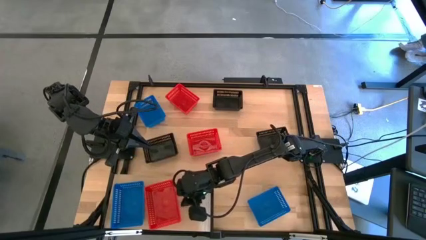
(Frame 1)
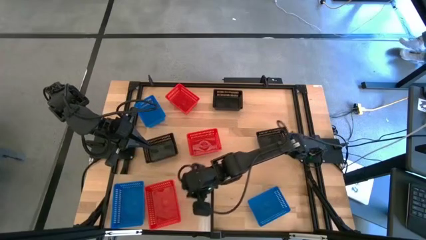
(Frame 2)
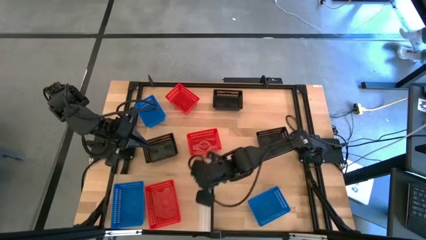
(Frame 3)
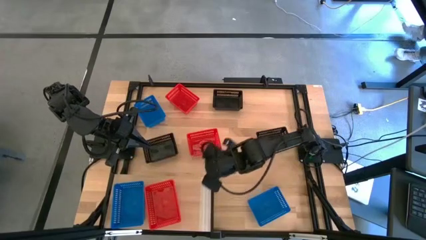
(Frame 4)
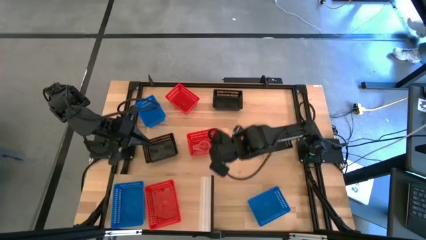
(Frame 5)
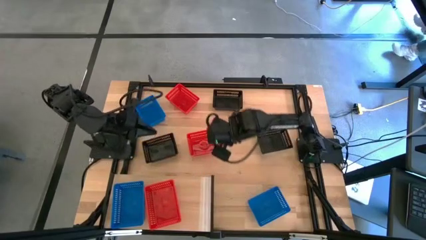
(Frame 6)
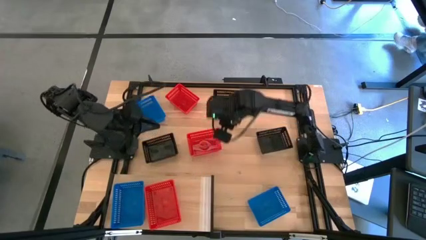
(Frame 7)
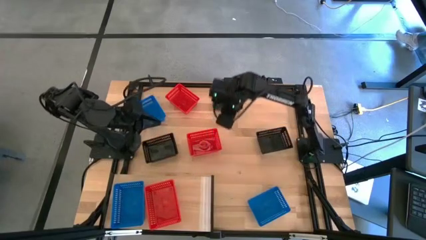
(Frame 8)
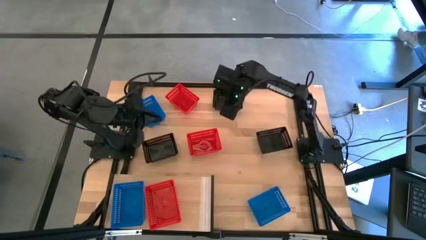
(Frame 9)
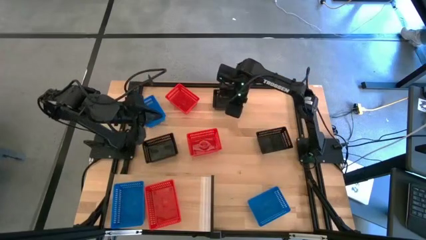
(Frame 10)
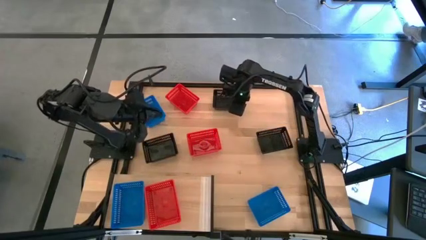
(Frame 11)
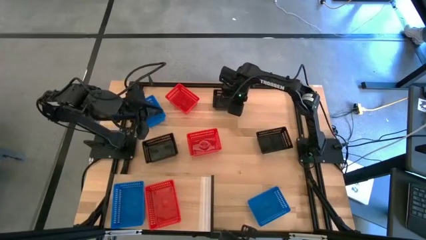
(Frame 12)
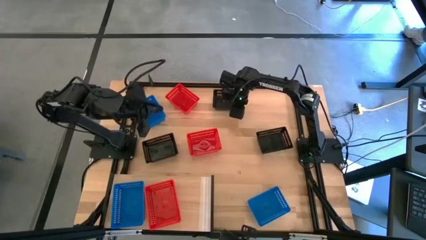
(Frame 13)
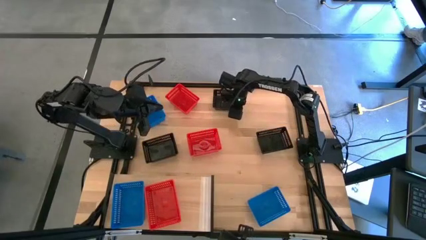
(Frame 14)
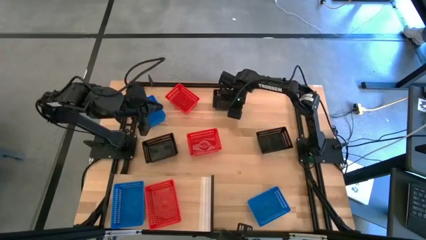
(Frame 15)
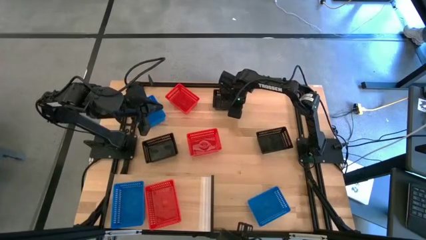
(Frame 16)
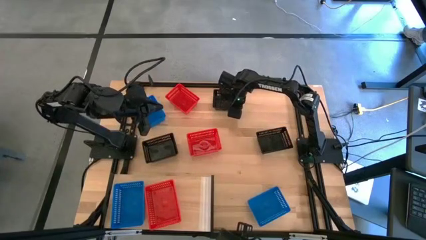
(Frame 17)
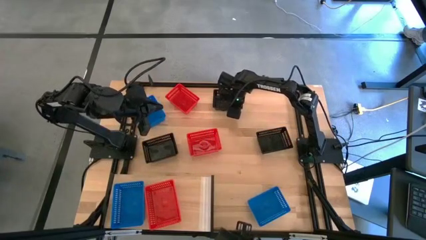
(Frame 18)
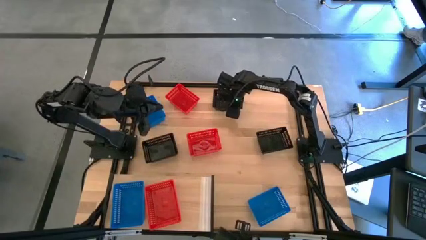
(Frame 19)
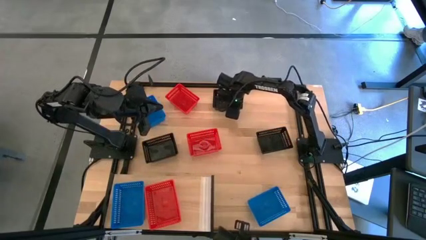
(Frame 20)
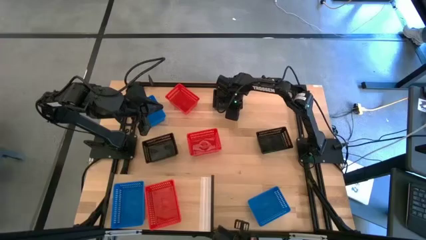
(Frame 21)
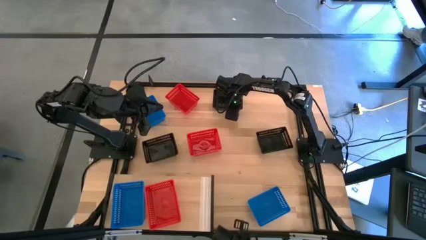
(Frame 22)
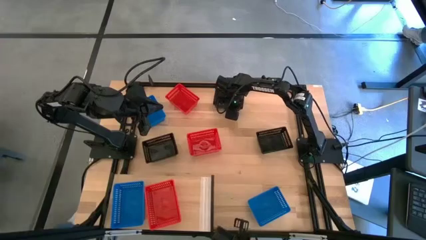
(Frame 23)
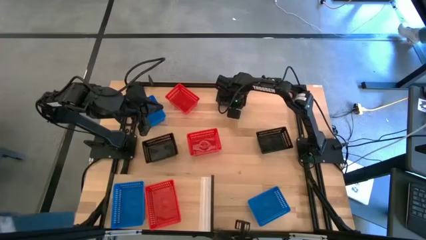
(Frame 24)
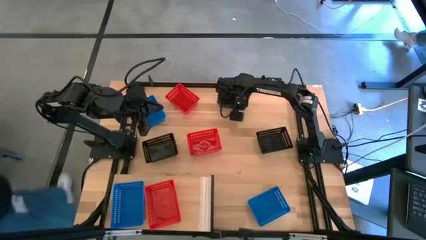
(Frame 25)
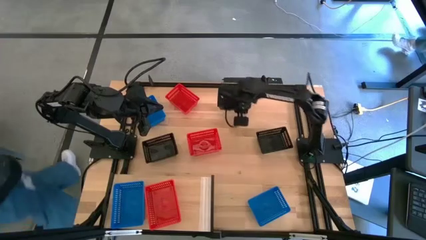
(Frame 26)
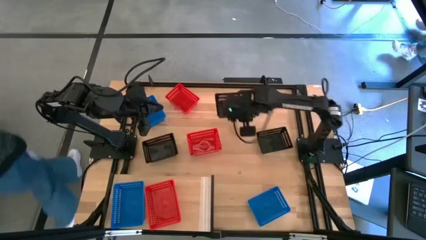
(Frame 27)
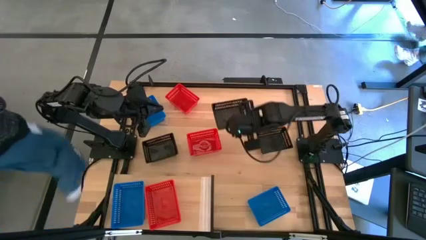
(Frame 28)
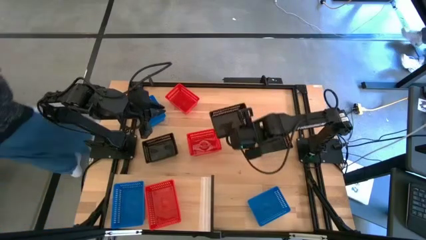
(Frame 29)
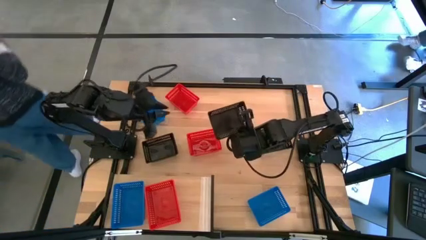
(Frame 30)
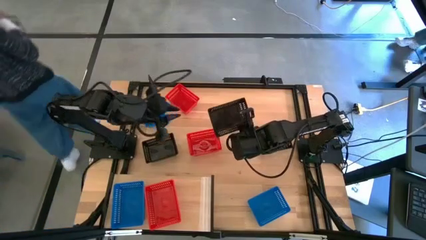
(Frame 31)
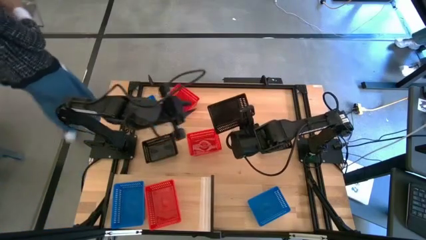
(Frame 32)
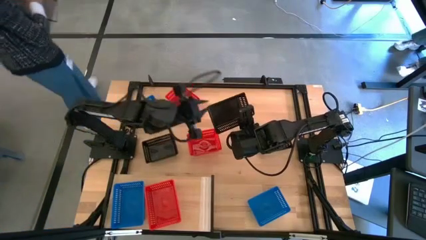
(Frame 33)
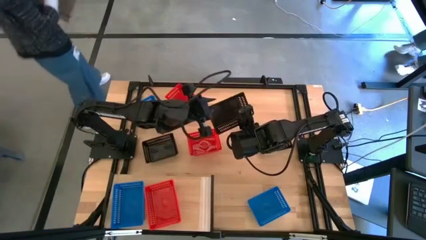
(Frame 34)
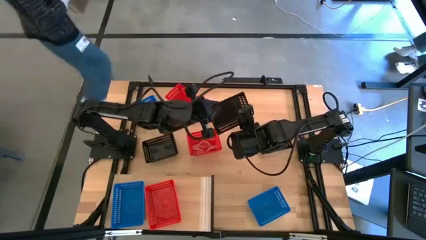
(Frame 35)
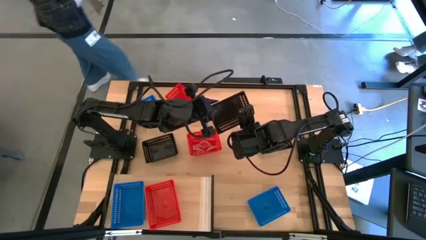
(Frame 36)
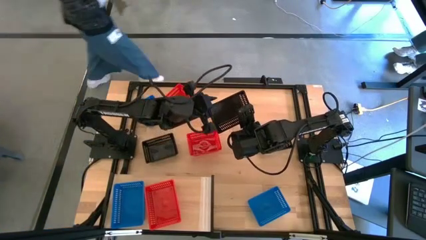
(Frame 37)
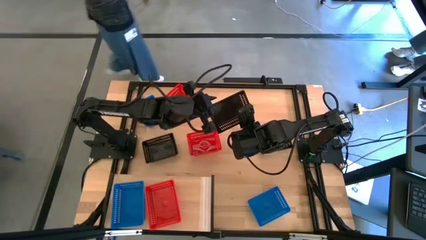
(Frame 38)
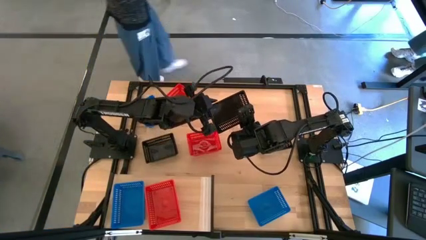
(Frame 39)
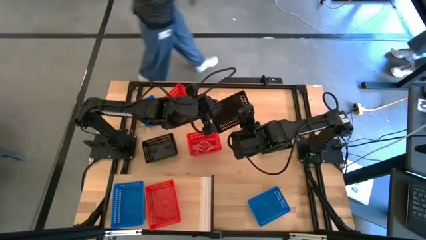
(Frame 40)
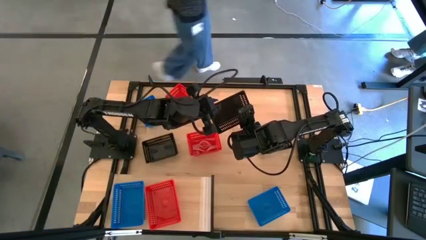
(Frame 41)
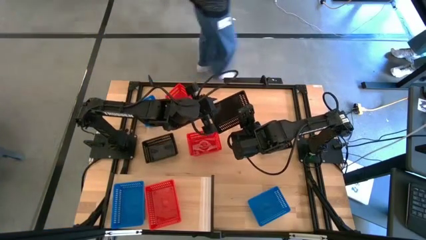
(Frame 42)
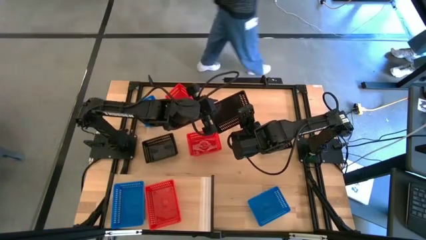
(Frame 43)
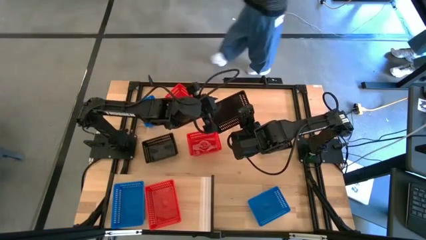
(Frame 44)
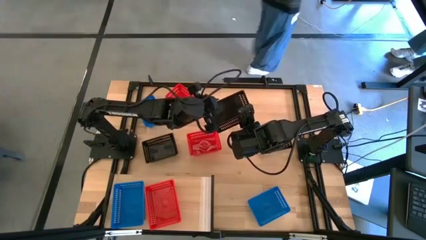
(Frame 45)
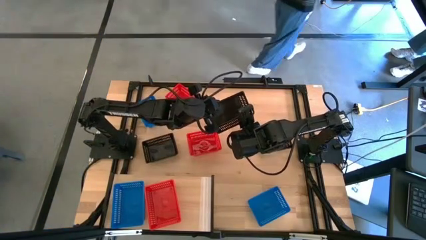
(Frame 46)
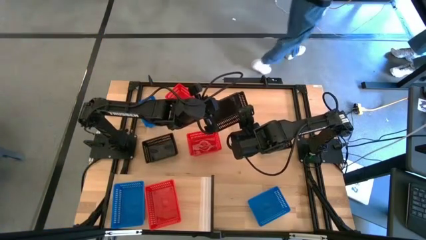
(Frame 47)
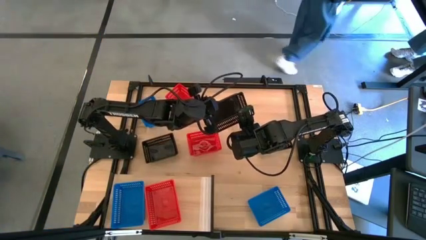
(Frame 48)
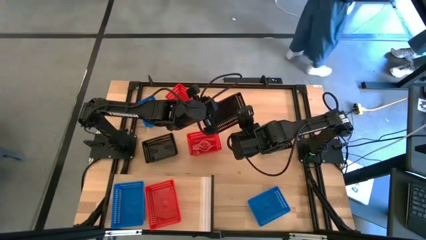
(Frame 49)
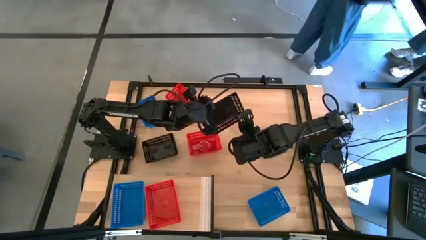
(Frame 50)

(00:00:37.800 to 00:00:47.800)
Task: Stack baskets on shelf by color
Put the center black bin on the shelf

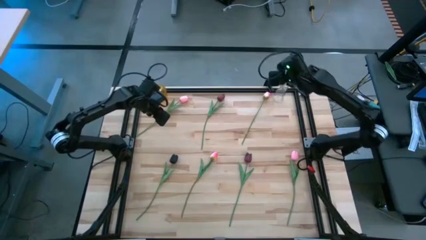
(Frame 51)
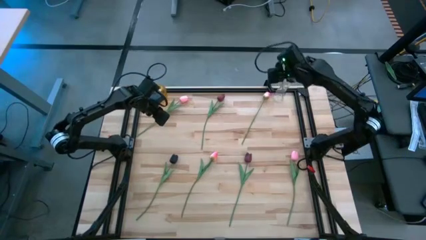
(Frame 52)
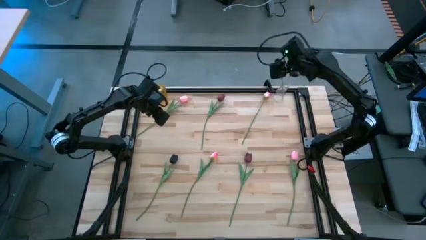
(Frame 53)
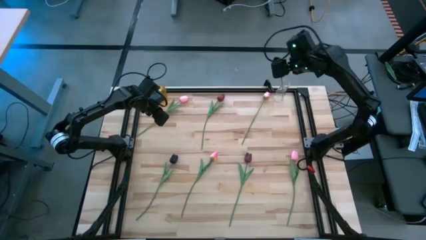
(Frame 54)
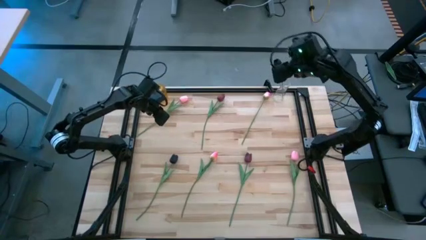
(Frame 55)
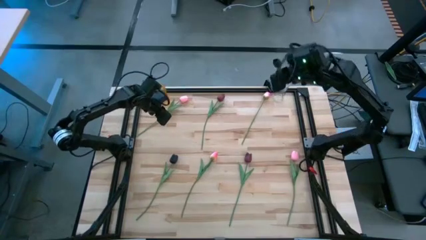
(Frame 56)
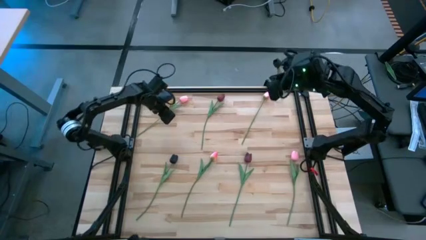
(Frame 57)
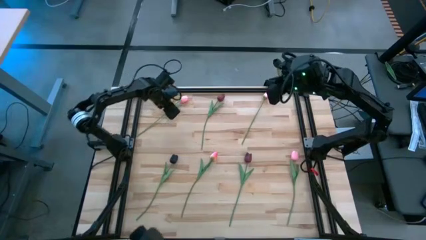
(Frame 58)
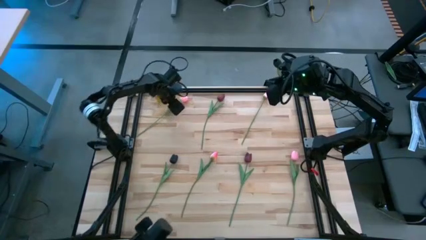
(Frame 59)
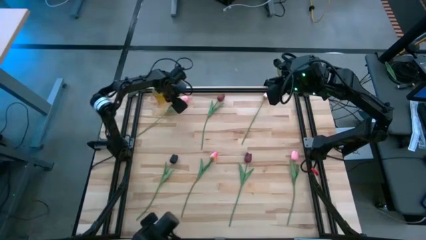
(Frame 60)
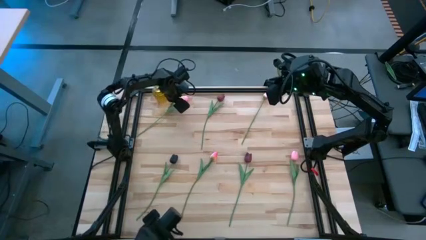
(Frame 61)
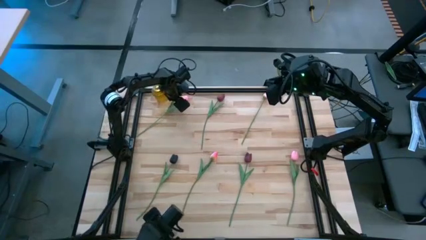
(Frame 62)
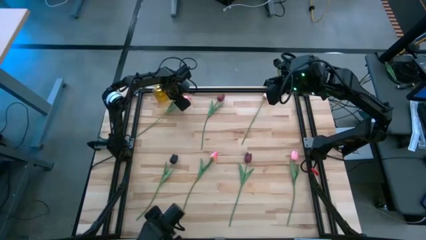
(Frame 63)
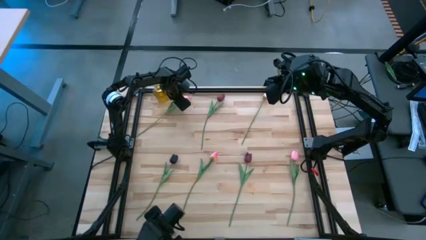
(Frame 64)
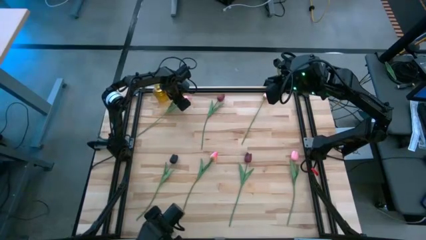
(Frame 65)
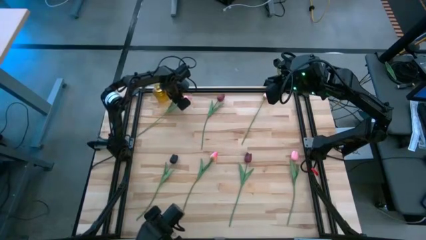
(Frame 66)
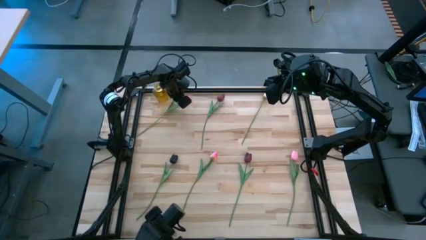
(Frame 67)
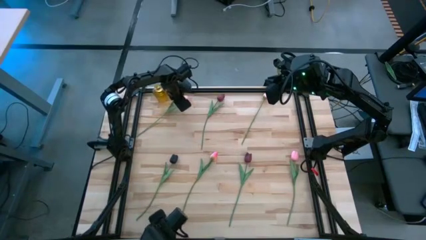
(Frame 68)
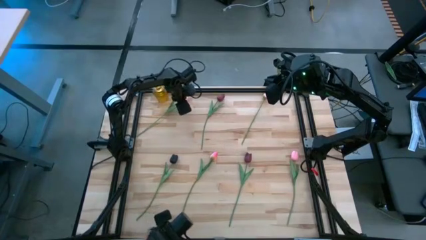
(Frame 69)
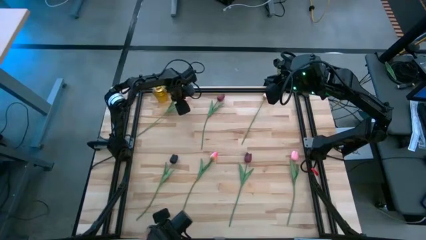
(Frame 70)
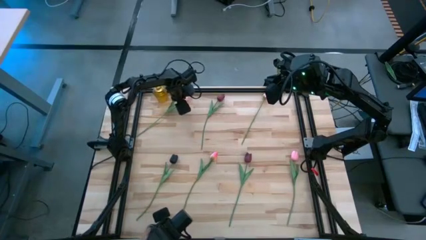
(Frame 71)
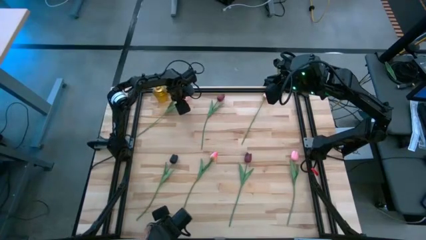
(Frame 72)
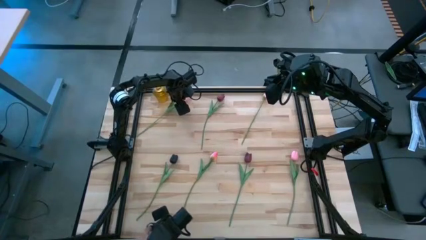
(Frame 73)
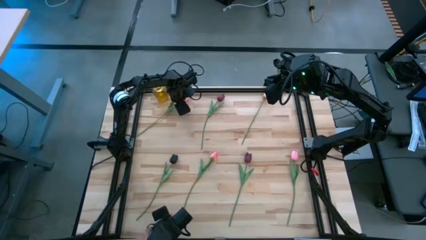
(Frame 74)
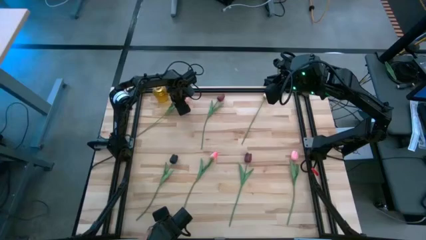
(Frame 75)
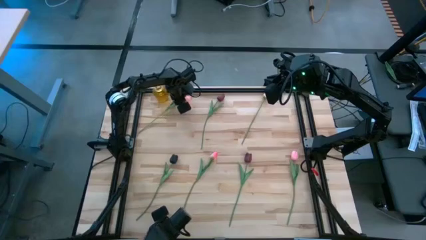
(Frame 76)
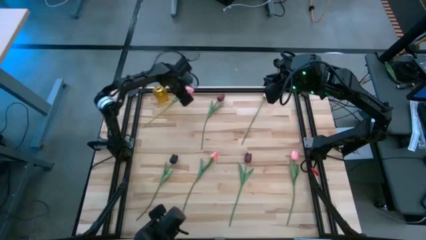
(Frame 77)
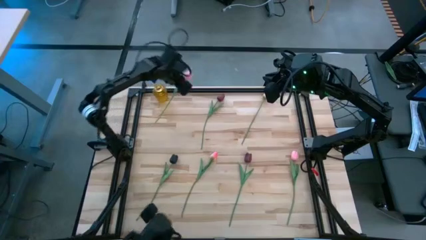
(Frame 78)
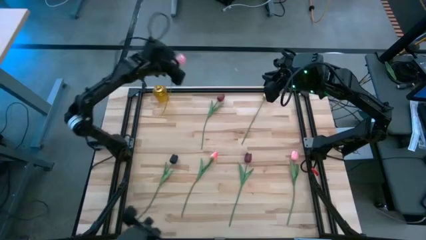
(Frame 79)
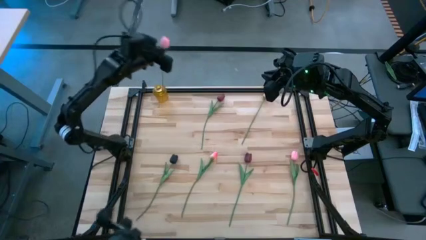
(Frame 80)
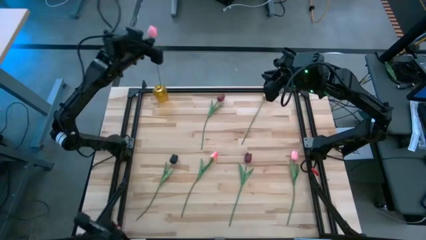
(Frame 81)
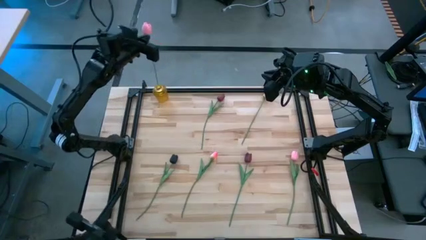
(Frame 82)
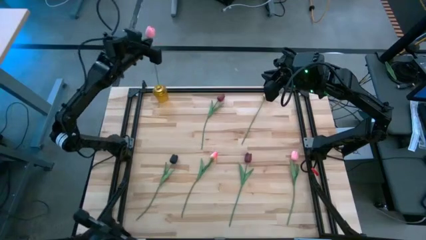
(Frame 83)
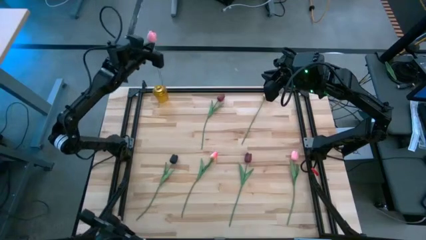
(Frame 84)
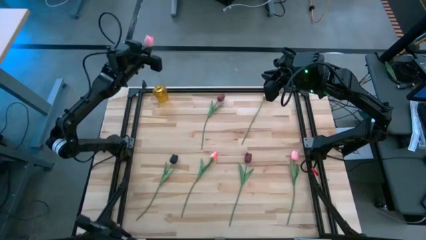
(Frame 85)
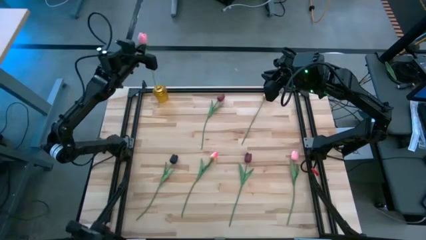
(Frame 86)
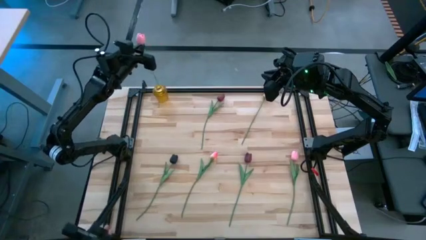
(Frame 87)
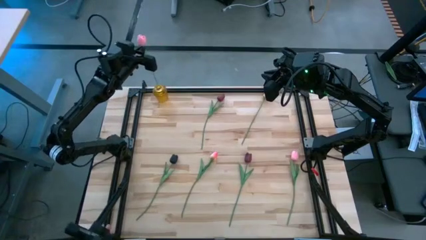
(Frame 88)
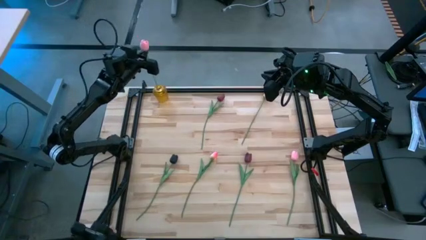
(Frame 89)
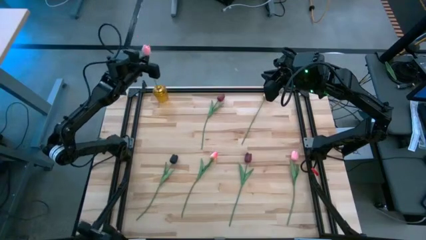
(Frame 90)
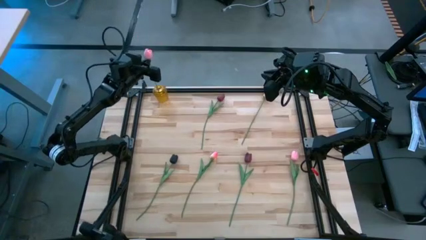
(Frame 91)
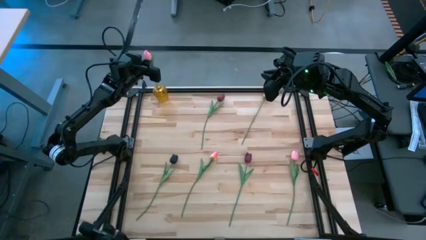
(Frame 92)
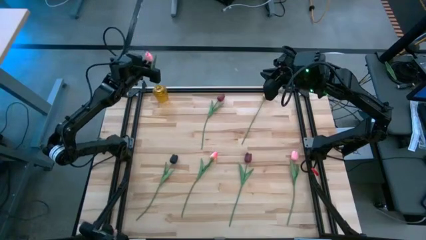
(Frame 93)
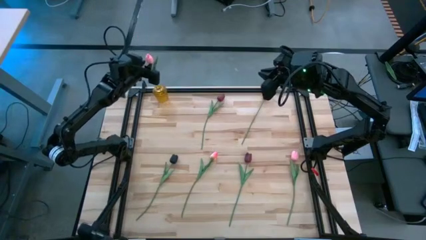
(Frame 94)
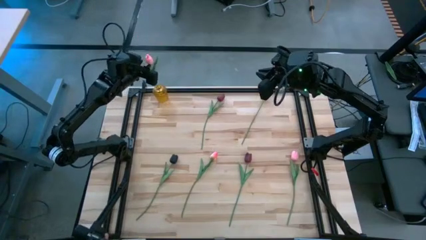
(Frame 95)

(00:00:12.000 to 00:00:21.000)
Task: Sort flowers into vase by color
Insert the top left pink tulip into the yellow glass vase
